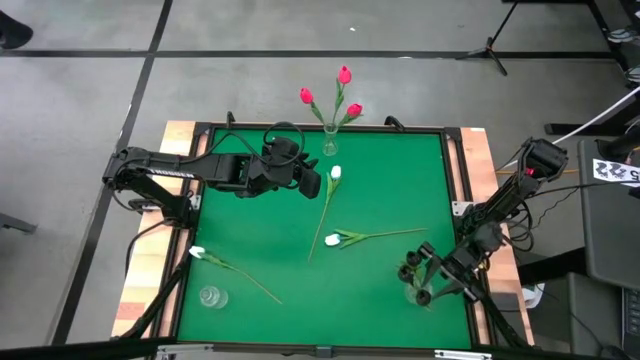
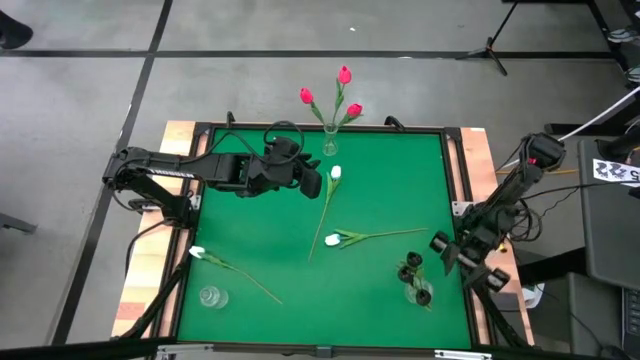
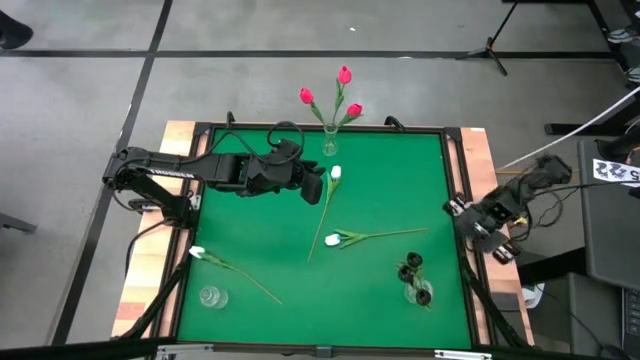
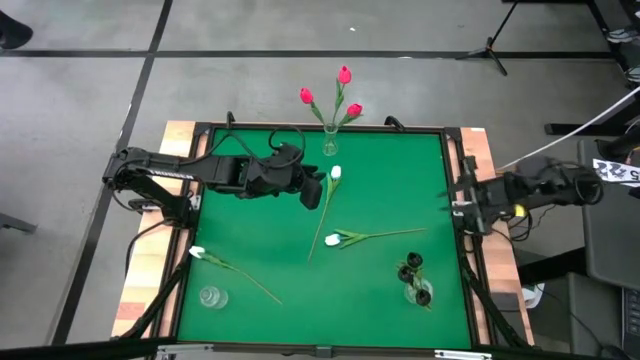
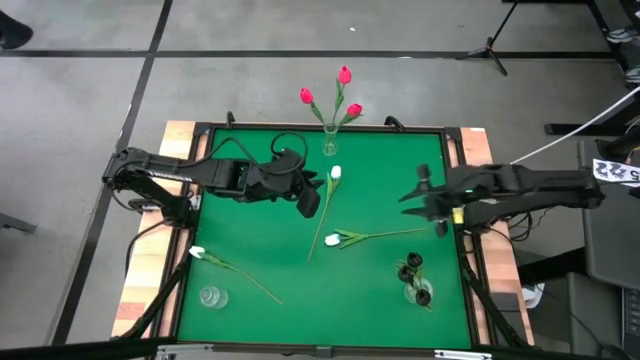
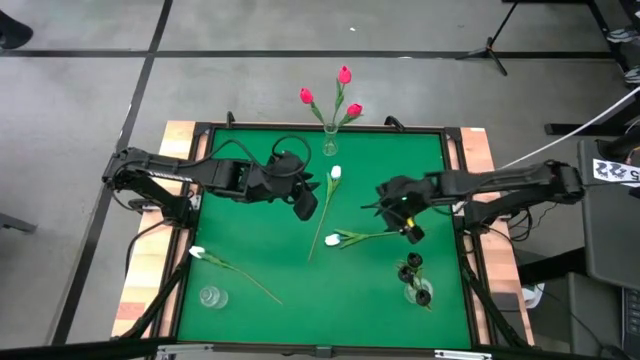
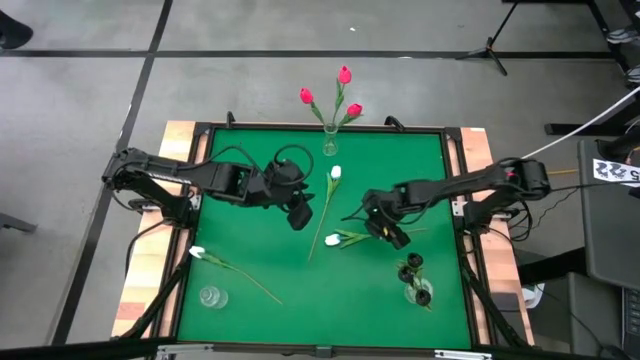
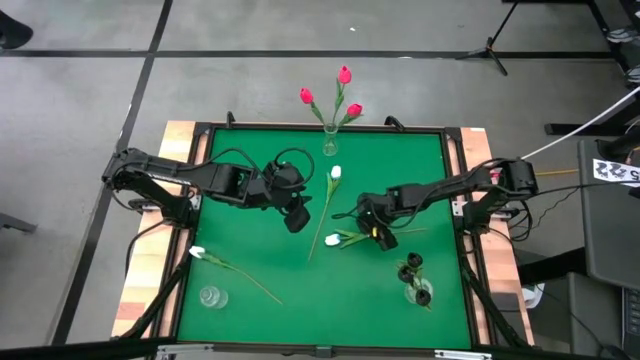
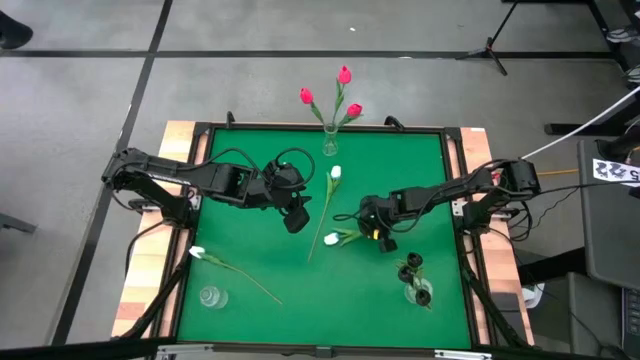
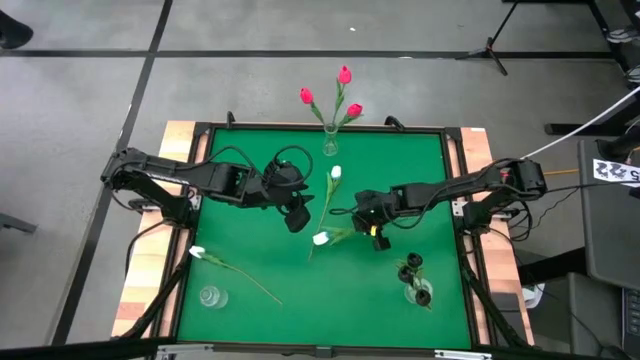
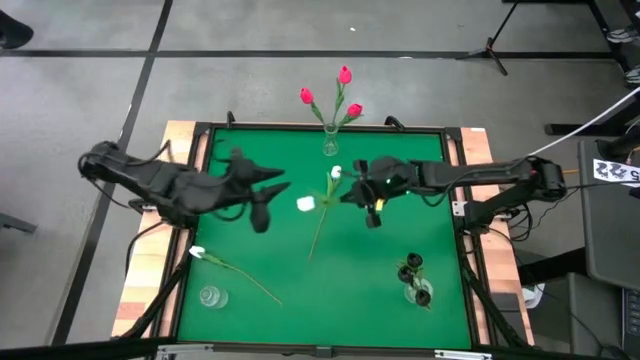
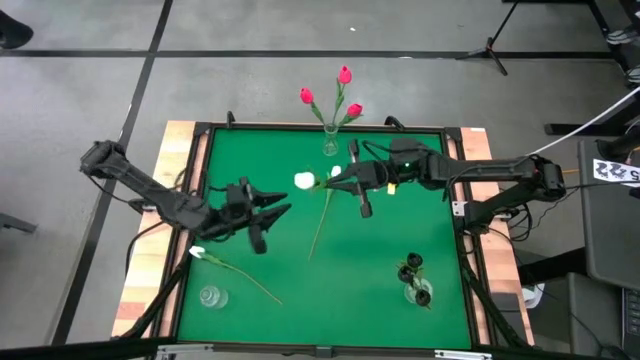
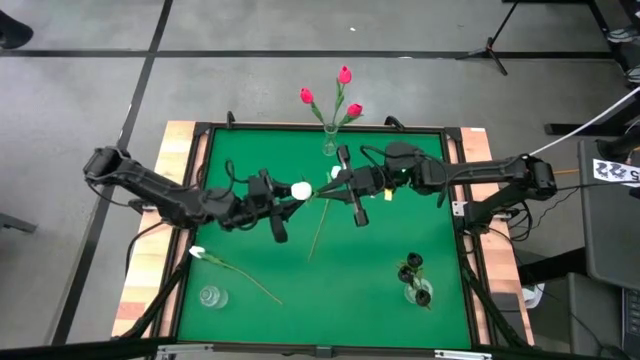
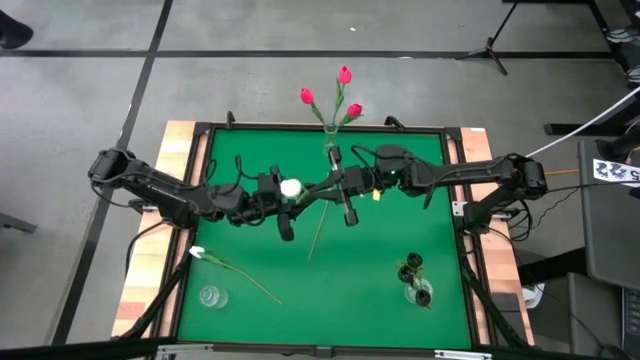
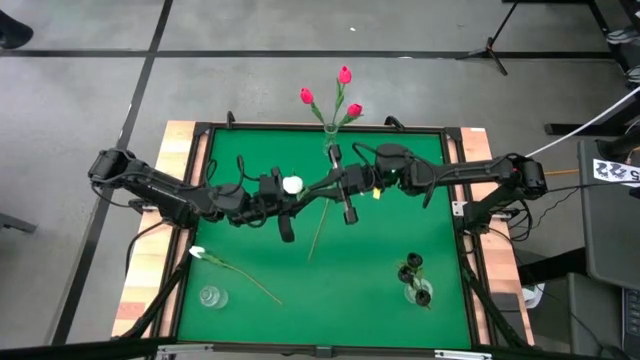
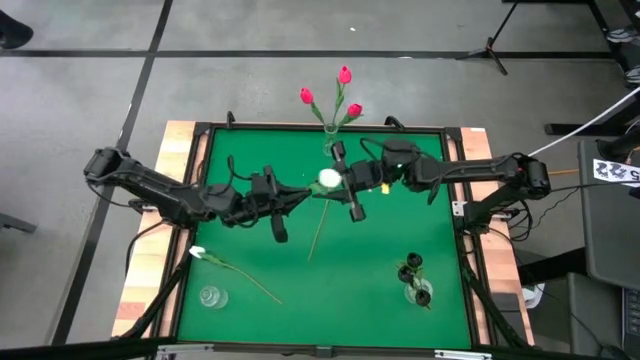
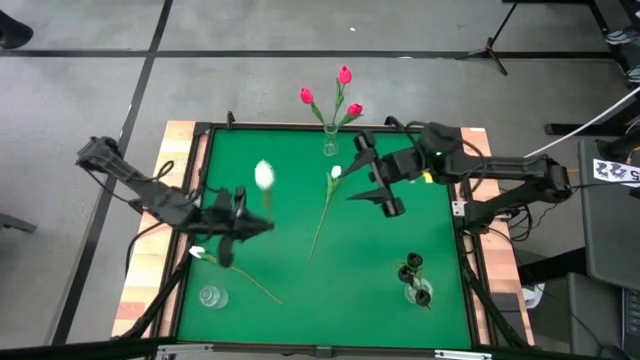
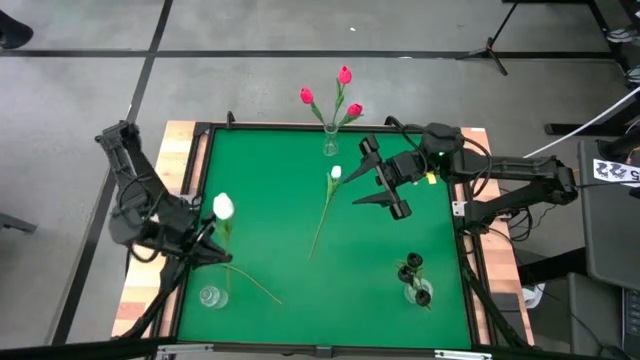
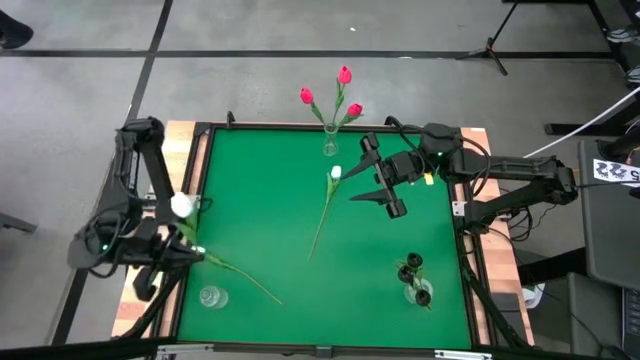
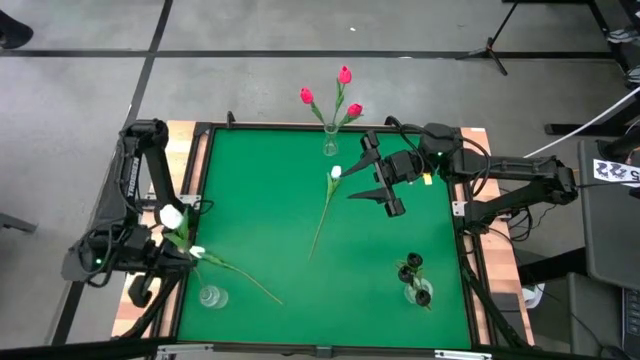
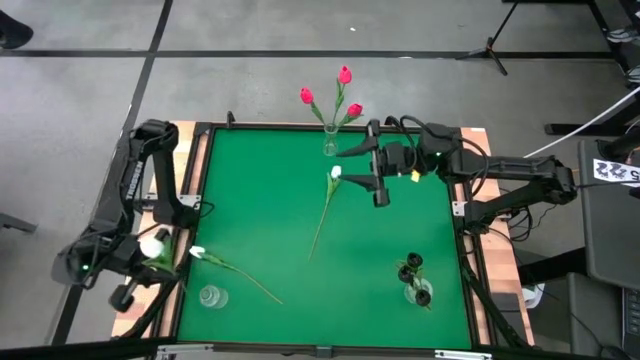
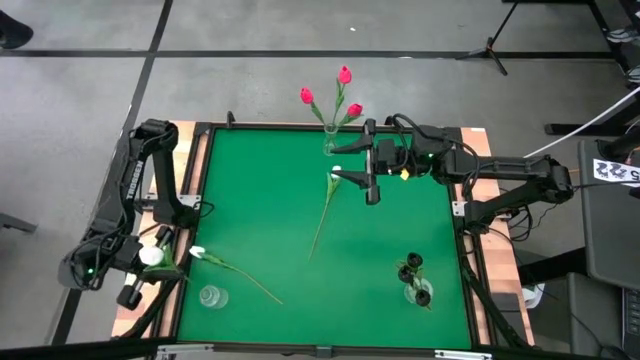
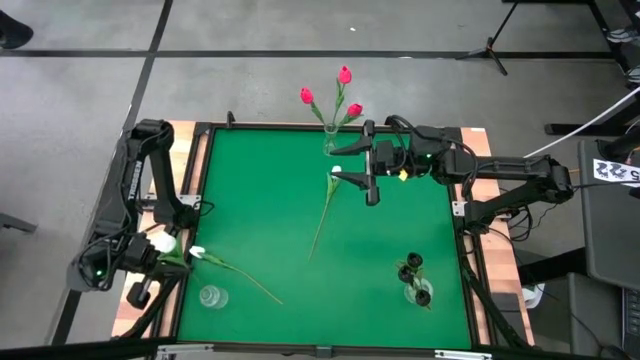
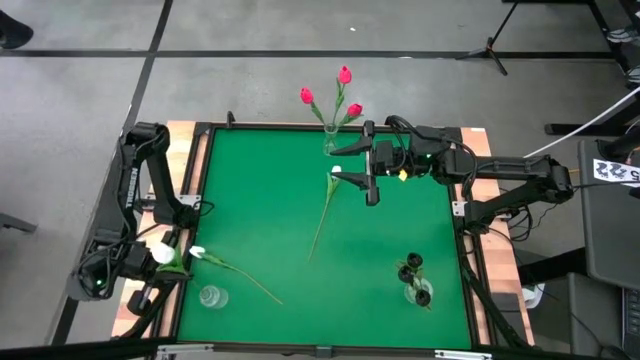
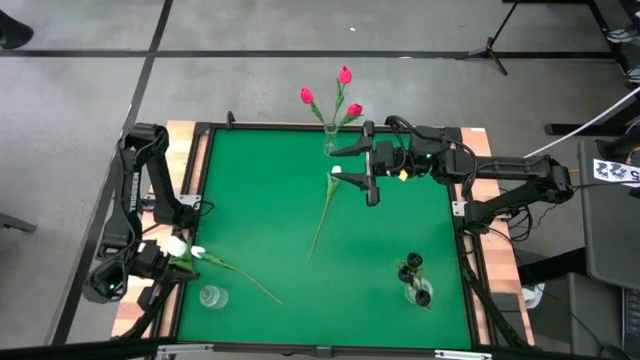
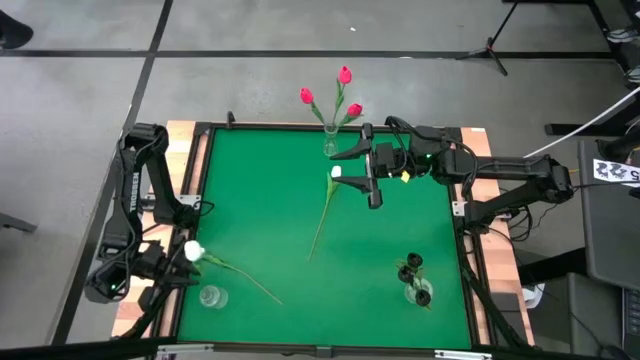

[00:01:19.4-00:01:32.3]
Task: Sort flowers into vase by color
Put the right white tulip into the bottom left transparent vase
